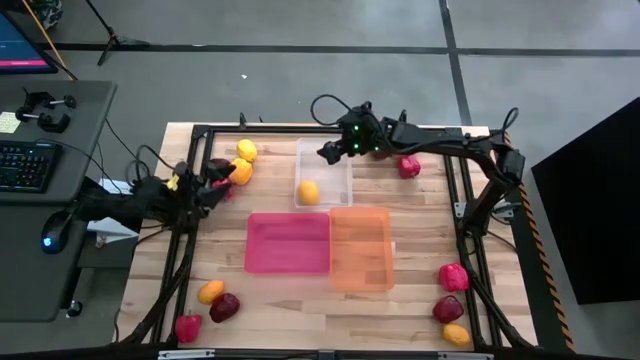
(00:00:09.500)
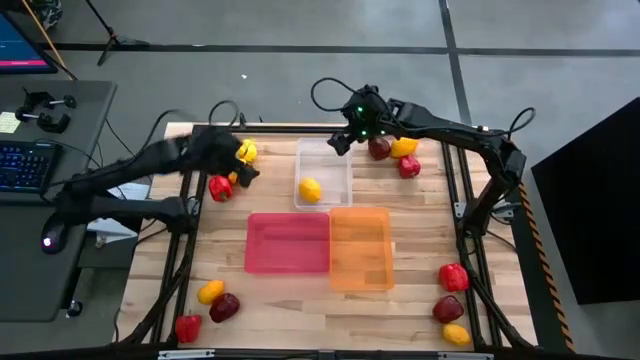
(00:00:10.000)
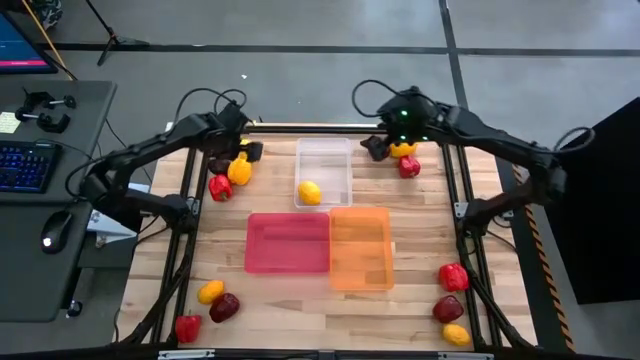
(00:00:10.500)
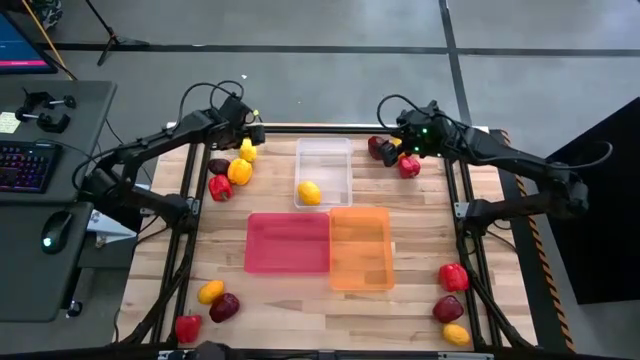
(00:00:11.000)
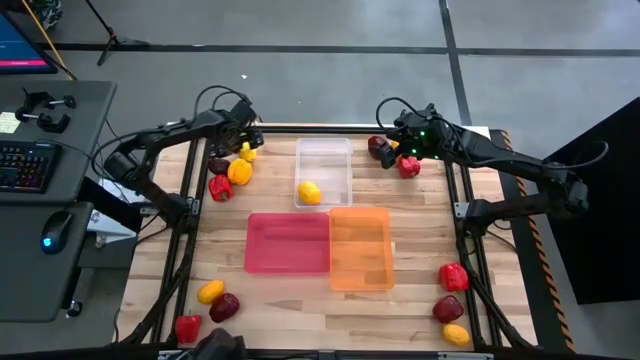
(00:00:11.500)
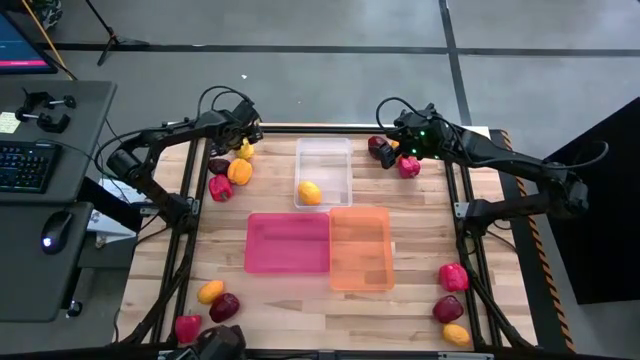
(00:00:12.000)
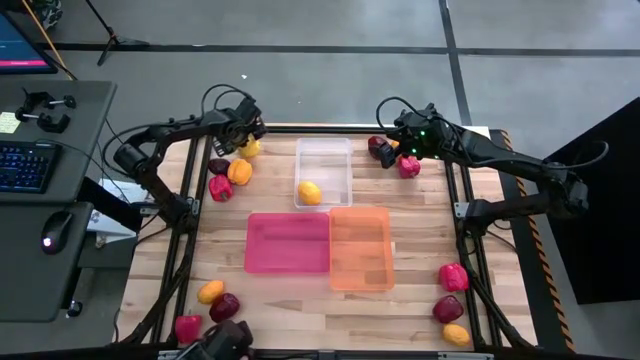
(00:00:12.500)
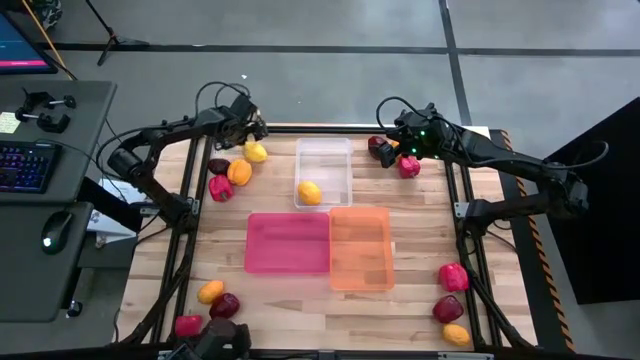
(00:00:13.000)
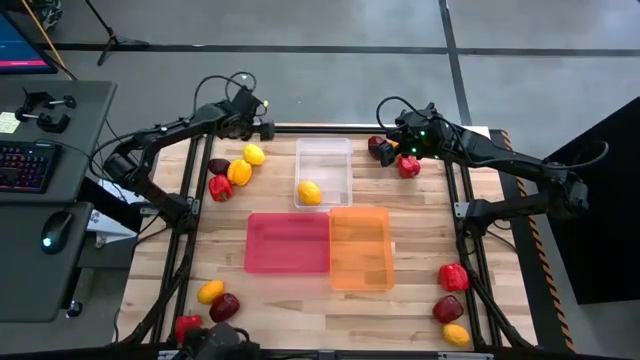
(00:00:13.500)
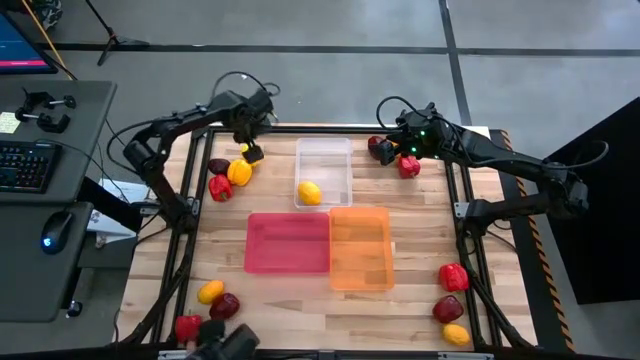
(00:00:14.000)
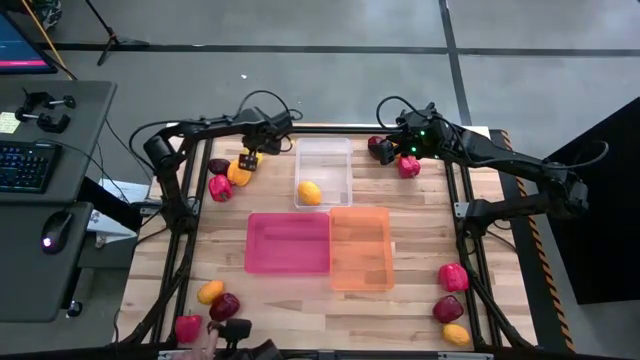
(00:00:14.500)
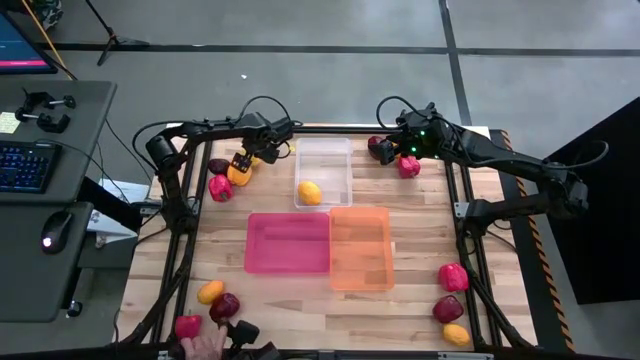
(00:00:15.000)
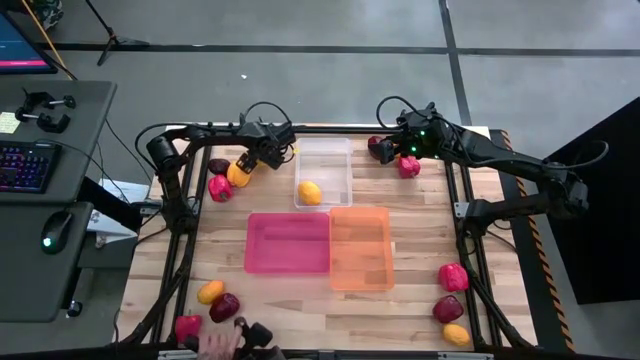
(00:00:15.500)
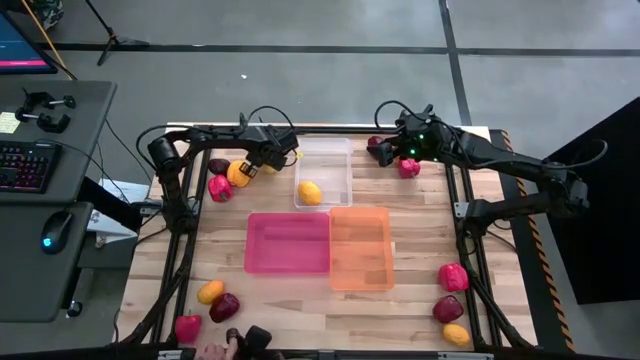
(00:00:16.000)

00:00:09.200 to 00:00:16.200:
Task: Sort produce into baskets
Put the lemon into the white bin

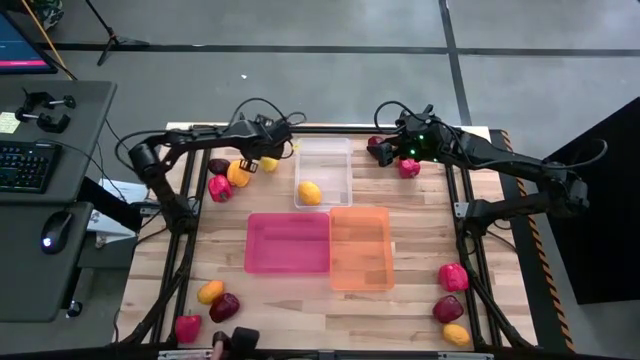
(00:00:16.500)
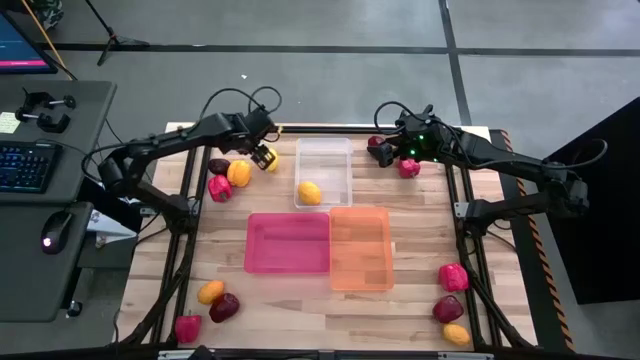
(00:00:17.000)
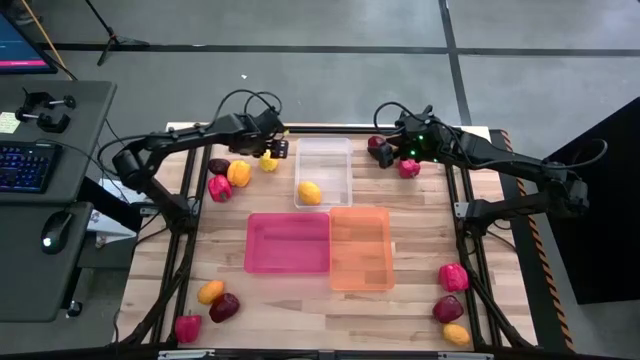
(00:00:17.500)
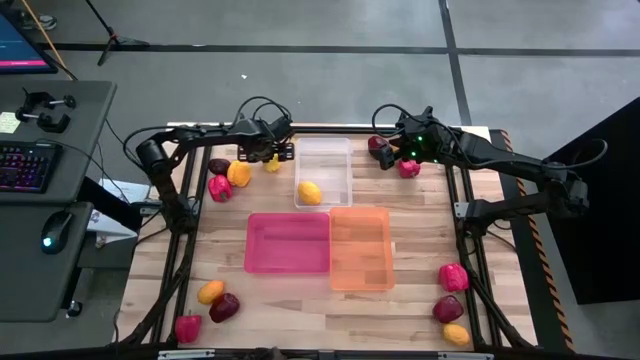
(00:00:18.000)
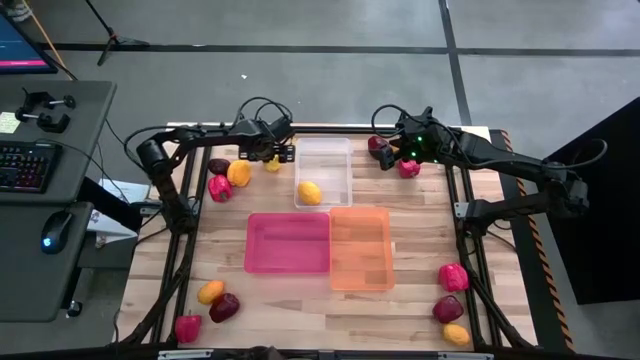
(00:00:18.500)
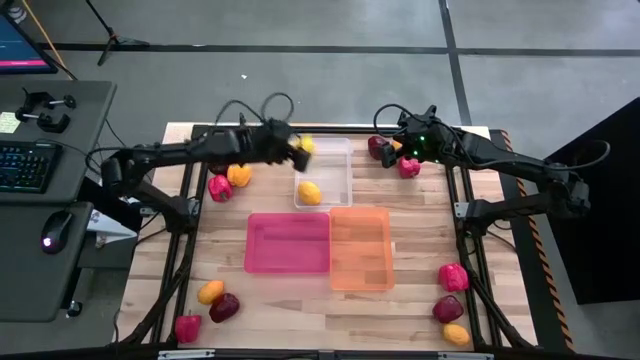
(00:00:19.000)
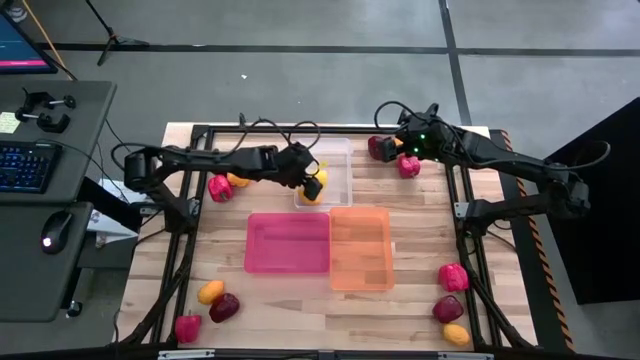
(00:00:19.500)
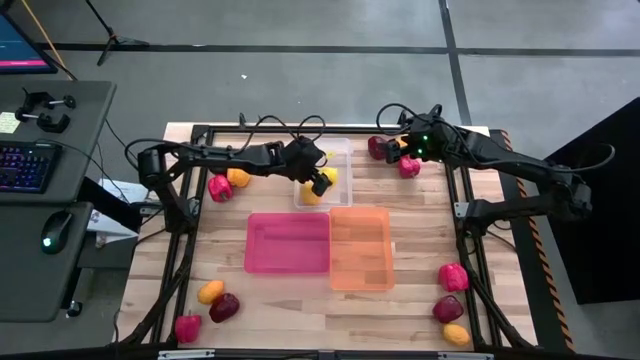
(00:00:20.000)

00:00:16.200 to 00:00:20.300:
Put the lemon into the white bin

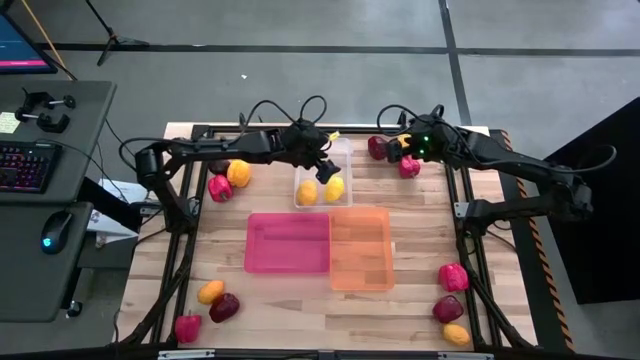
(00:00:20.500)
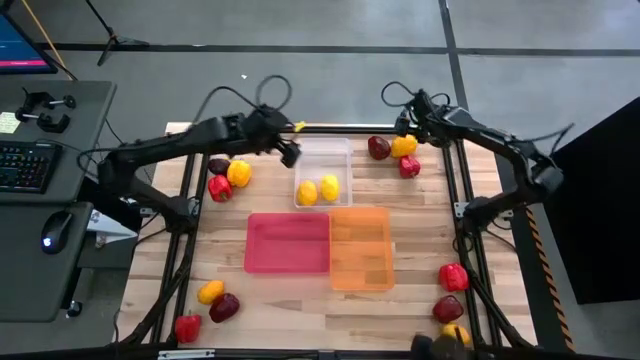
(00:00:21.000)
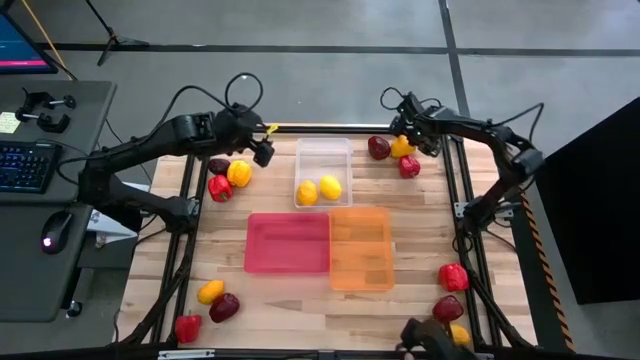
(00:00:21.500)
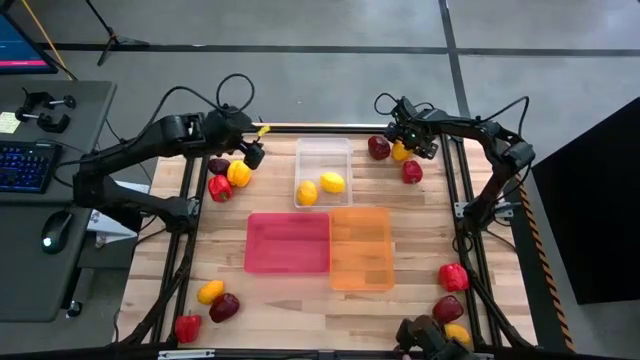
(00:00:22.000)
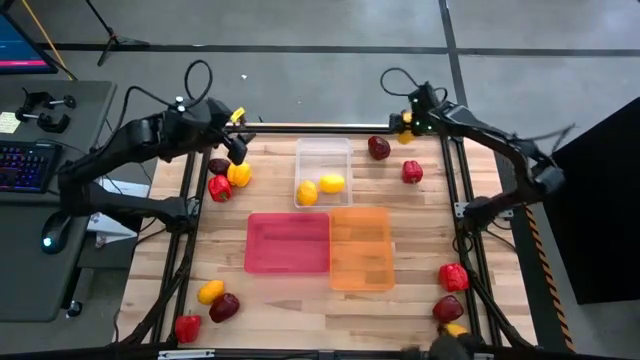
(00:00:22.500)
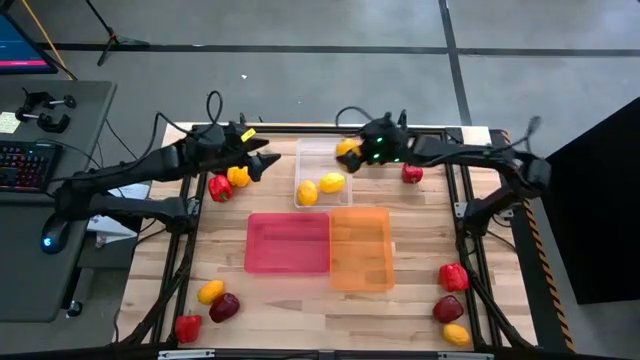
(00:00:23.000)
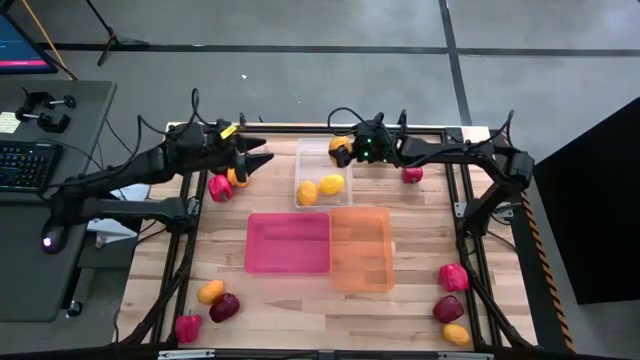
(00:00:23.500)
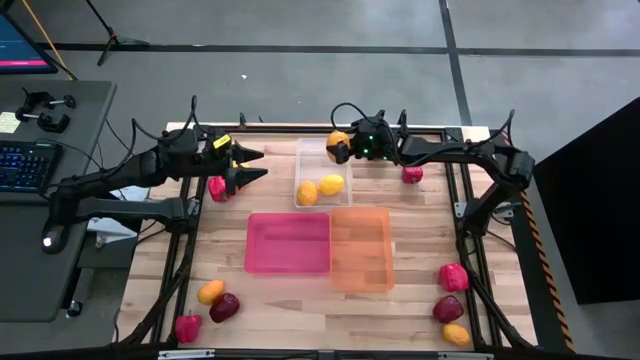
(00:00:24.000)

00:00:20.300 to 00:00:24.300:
Put the lemon into the white bin

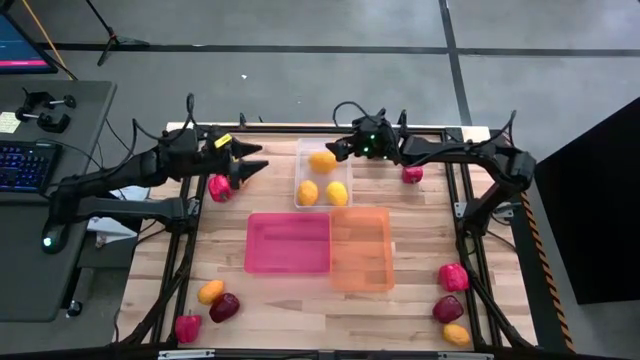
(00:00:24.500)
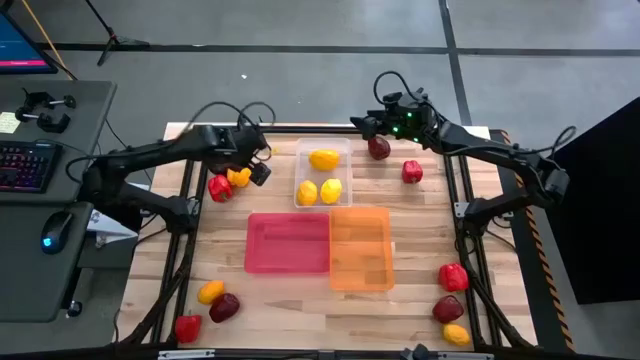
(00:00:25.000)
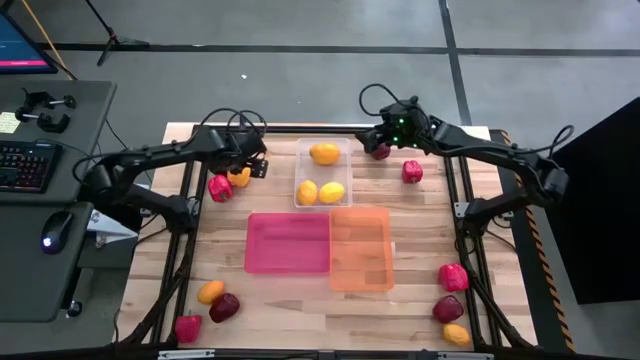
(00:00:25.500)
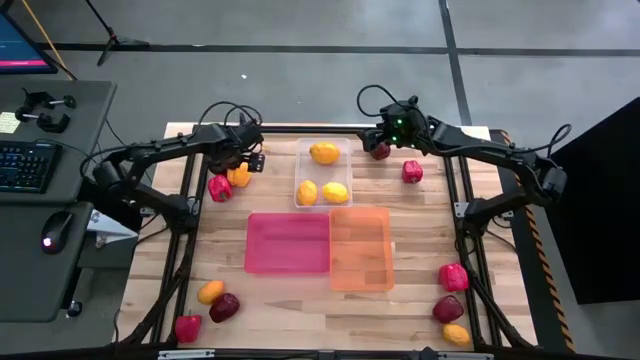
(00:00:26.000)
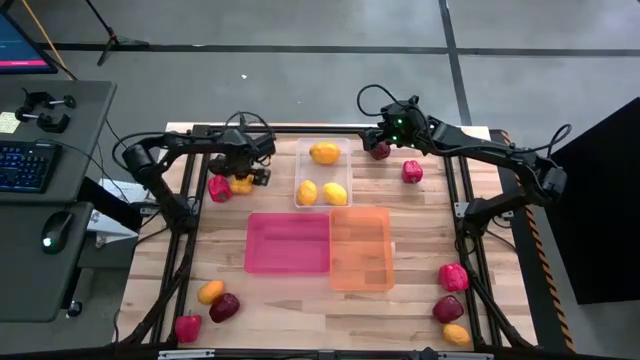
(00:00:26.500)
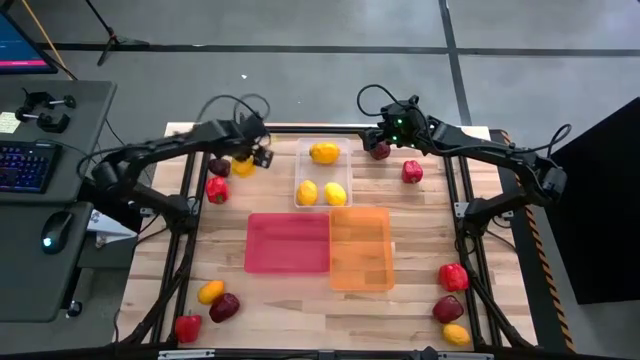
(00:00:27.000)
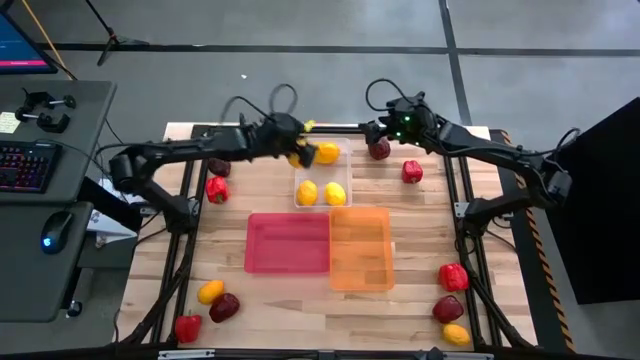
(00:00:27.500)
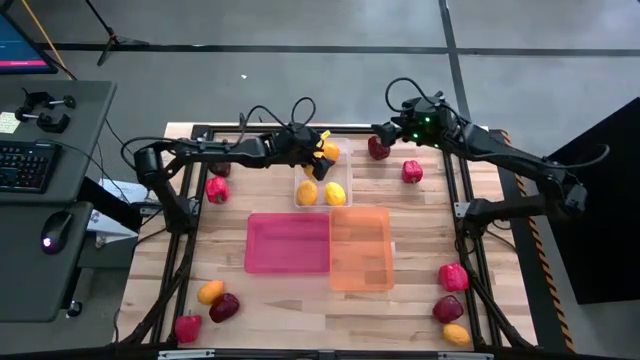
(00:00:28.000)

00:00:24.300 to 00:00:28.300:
Put the yellow bell pepper into the orange bin
